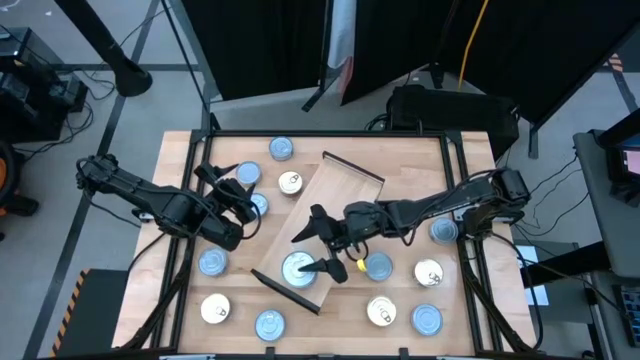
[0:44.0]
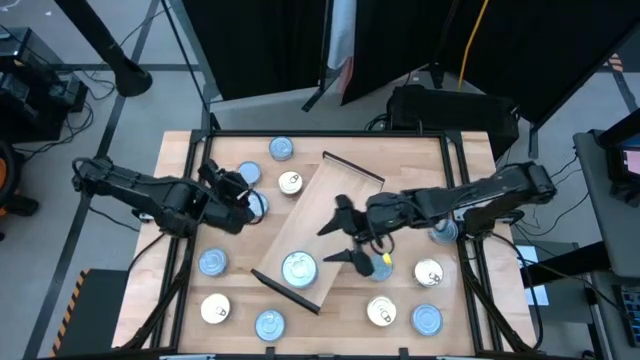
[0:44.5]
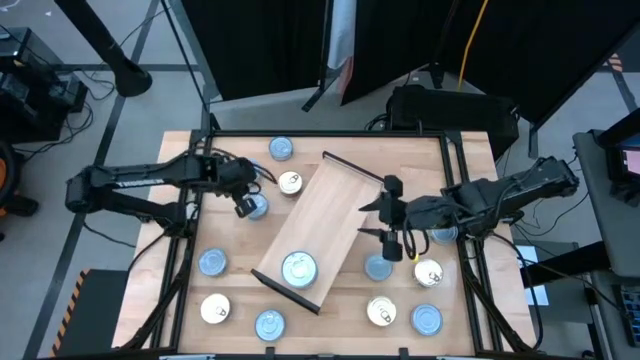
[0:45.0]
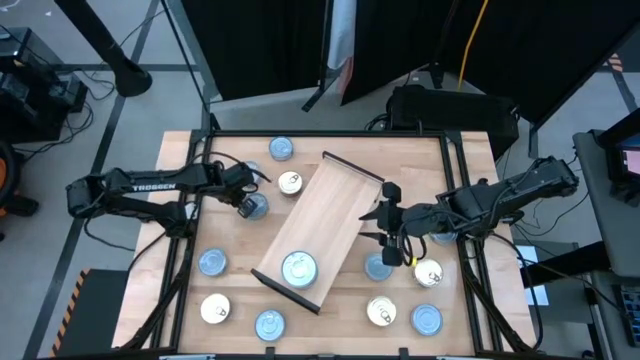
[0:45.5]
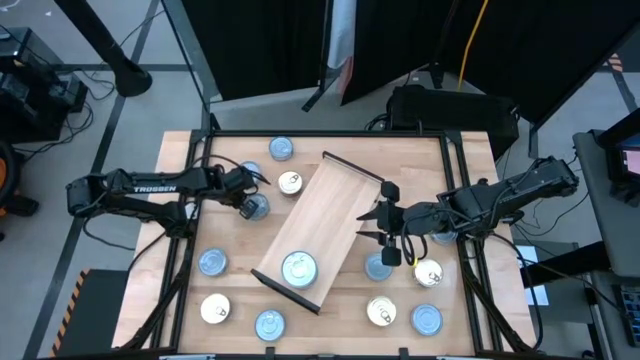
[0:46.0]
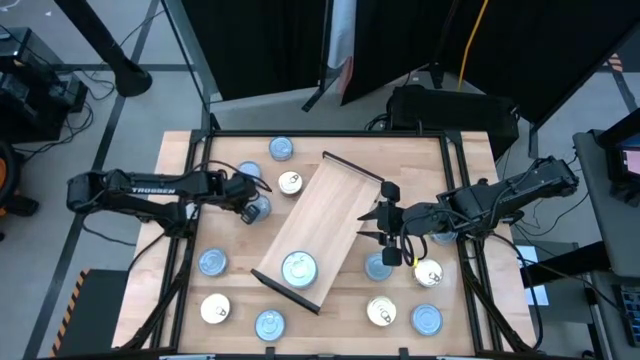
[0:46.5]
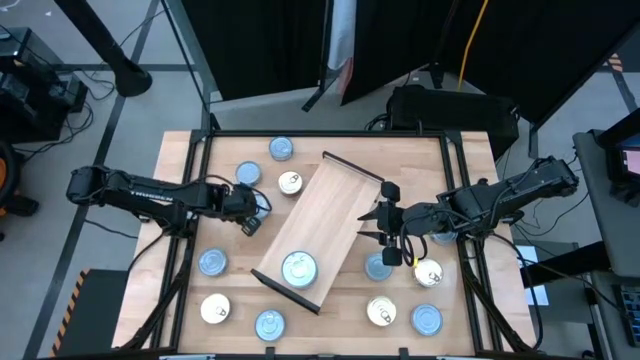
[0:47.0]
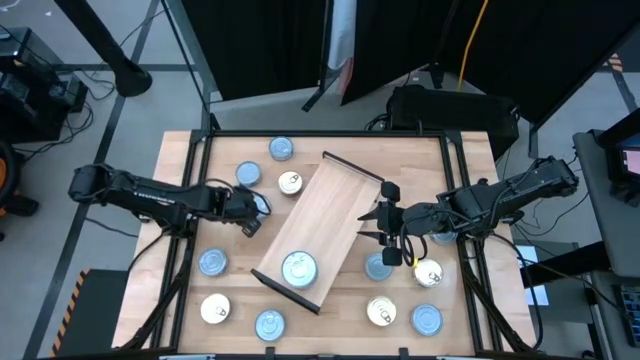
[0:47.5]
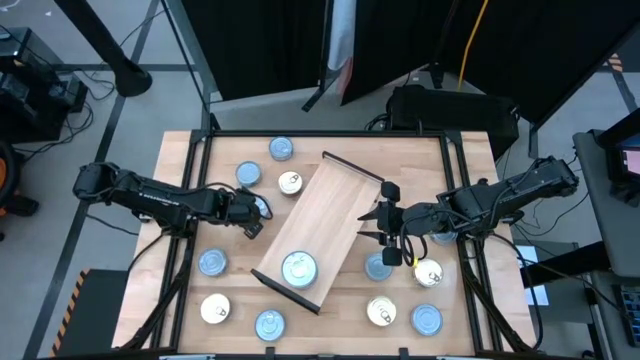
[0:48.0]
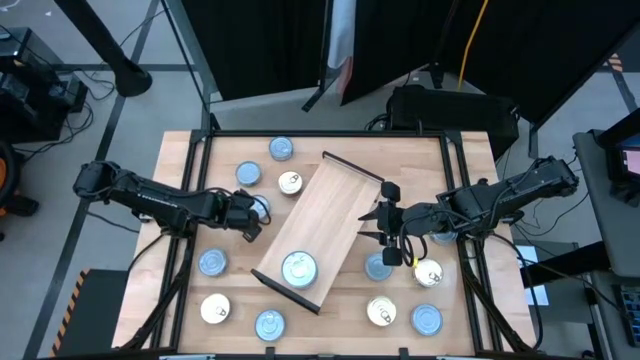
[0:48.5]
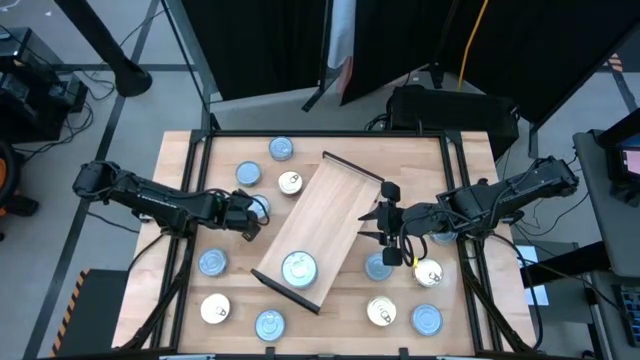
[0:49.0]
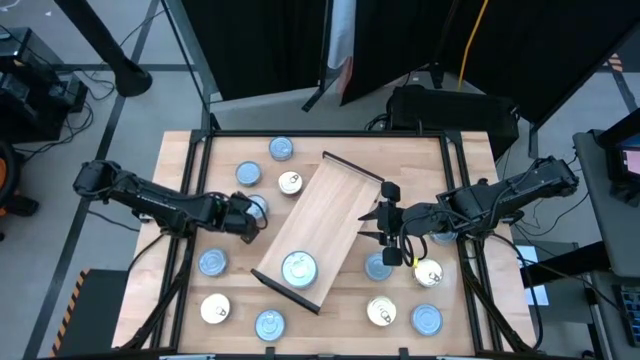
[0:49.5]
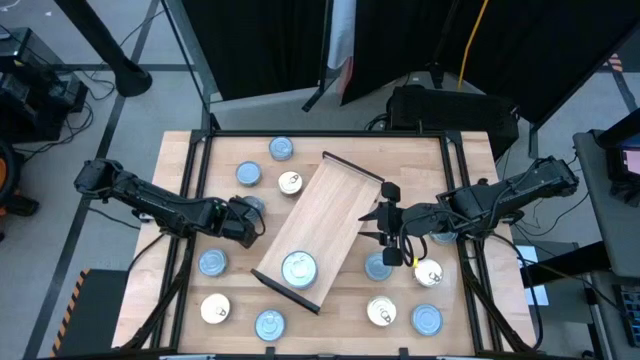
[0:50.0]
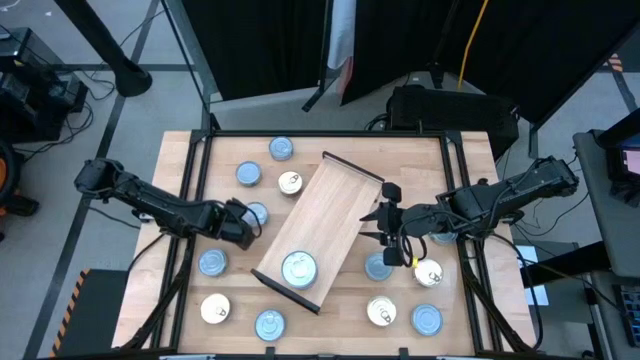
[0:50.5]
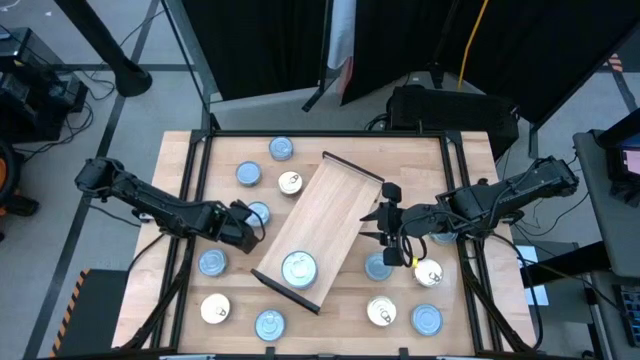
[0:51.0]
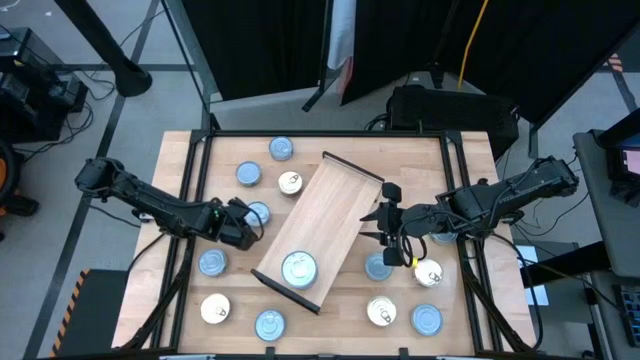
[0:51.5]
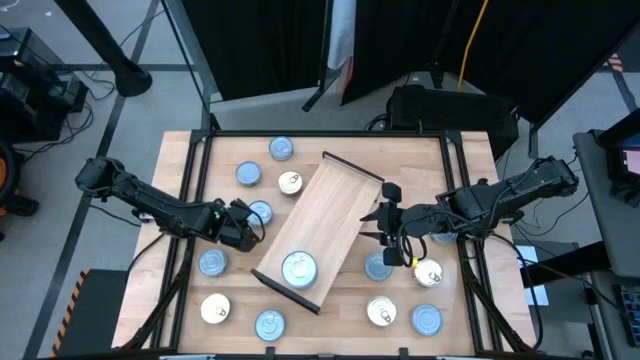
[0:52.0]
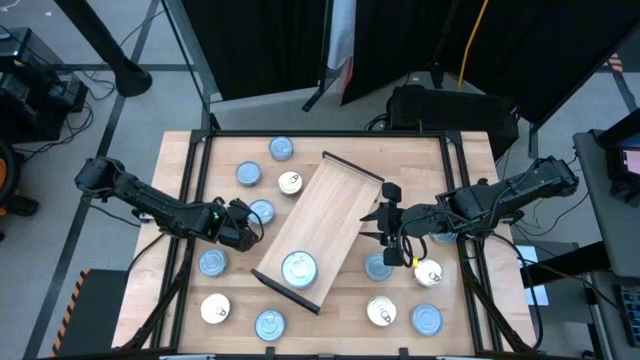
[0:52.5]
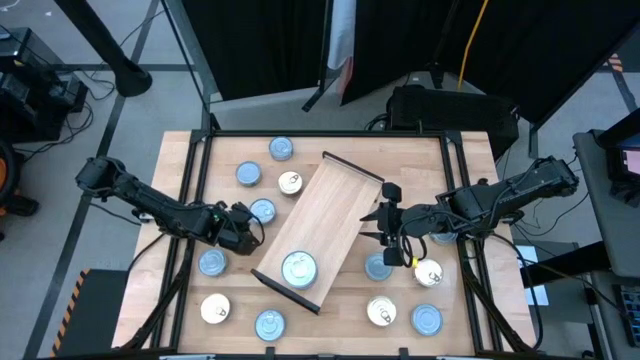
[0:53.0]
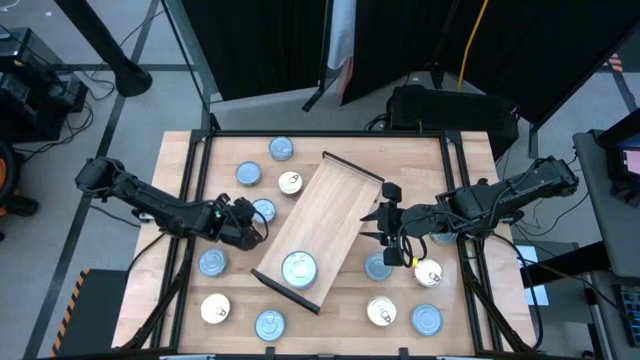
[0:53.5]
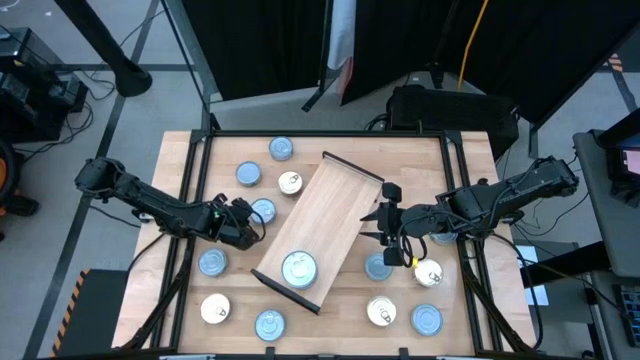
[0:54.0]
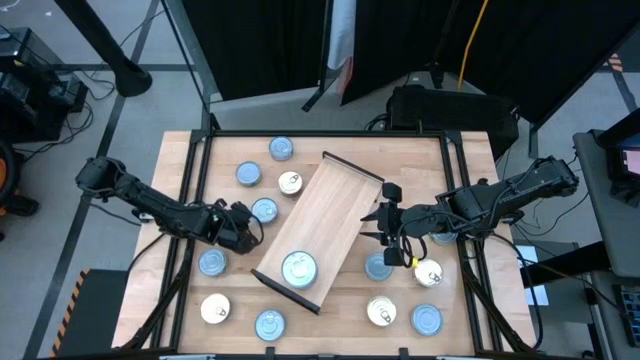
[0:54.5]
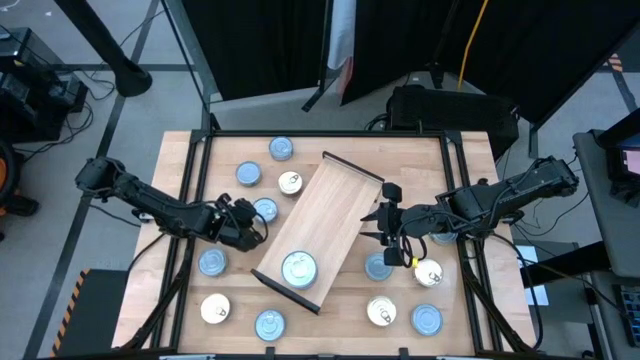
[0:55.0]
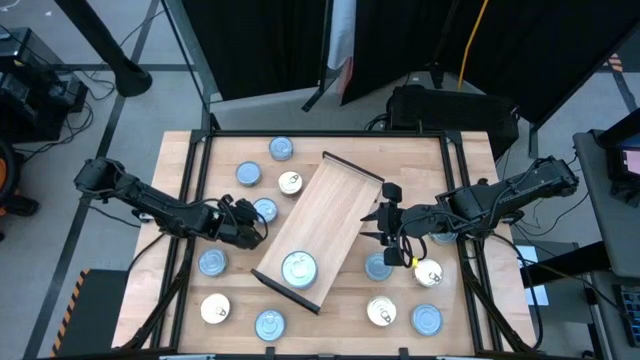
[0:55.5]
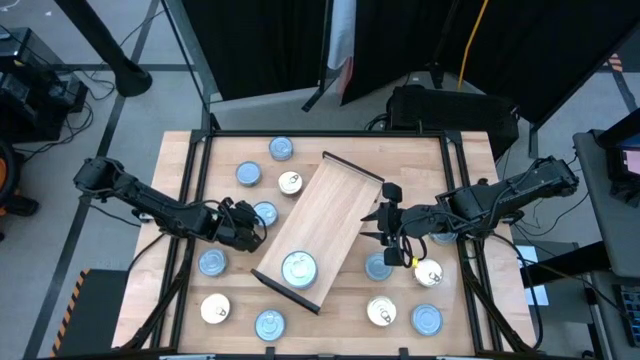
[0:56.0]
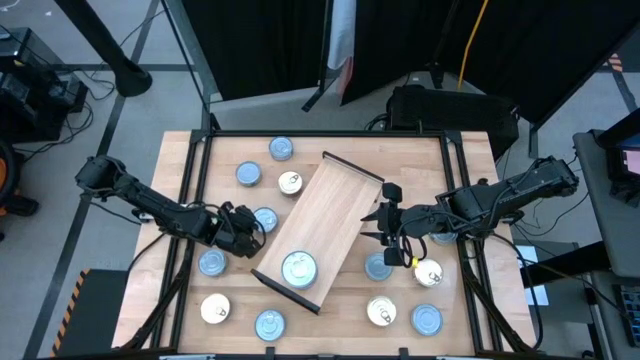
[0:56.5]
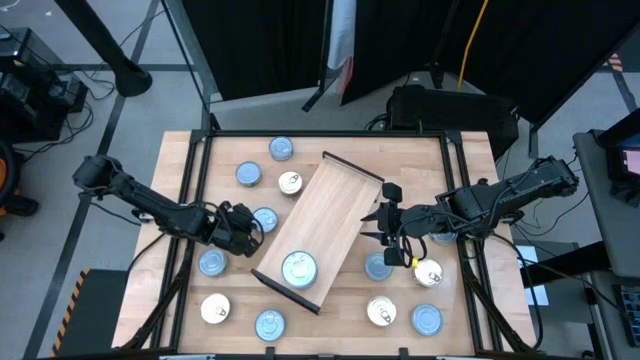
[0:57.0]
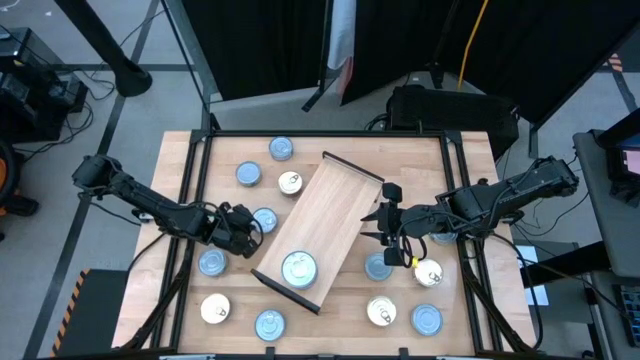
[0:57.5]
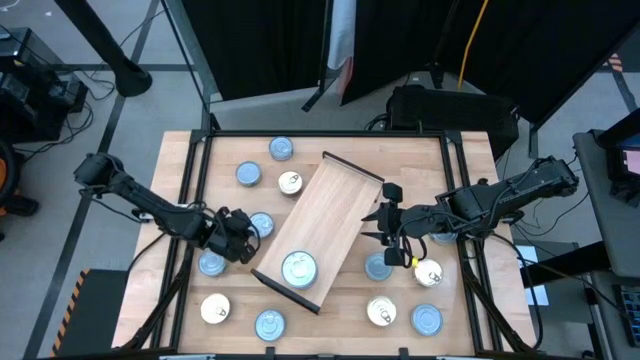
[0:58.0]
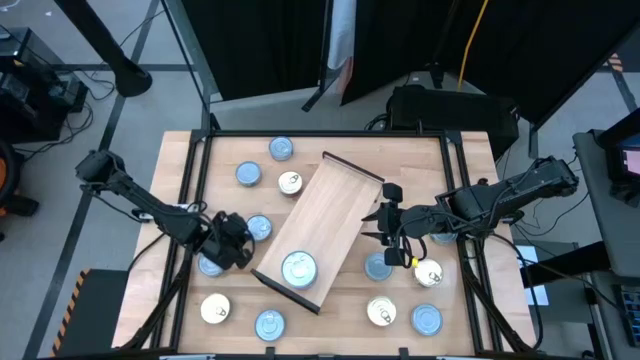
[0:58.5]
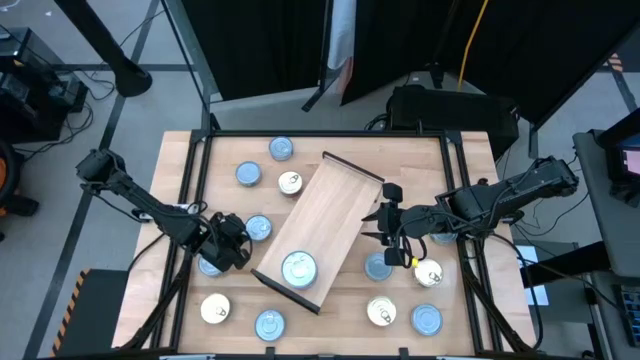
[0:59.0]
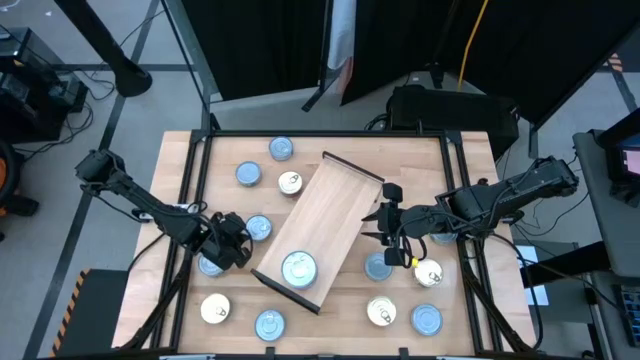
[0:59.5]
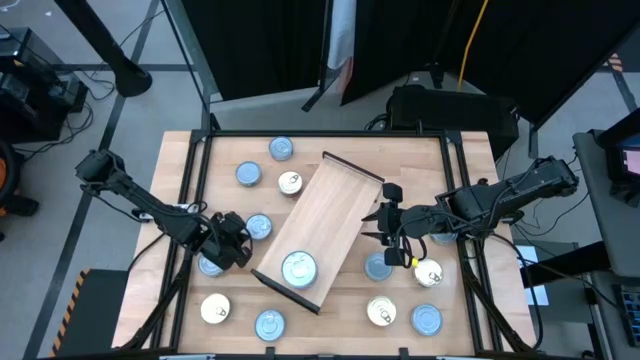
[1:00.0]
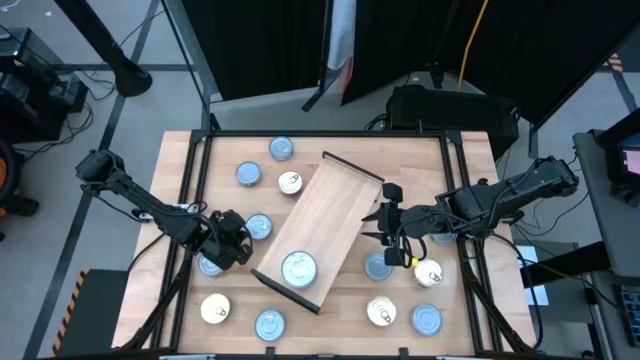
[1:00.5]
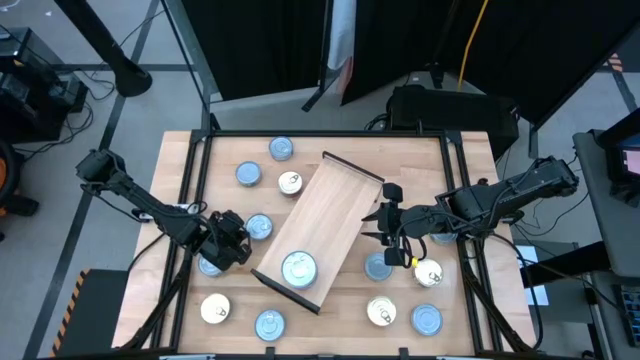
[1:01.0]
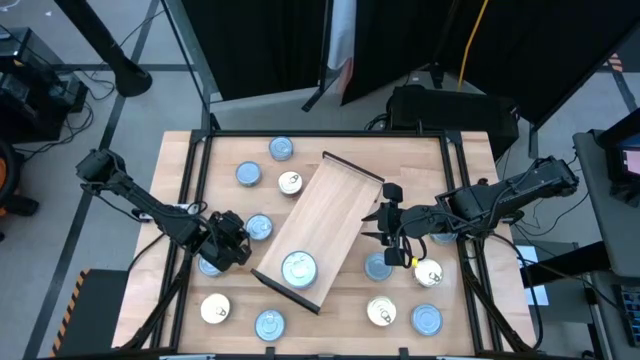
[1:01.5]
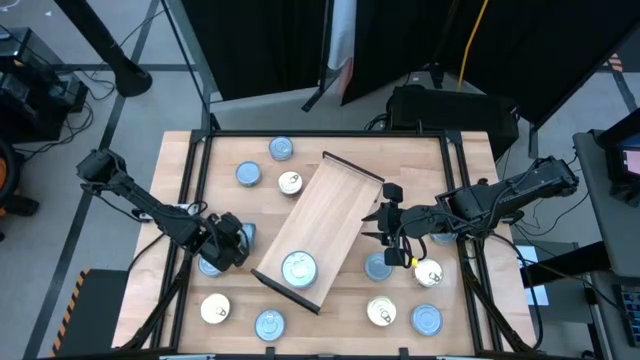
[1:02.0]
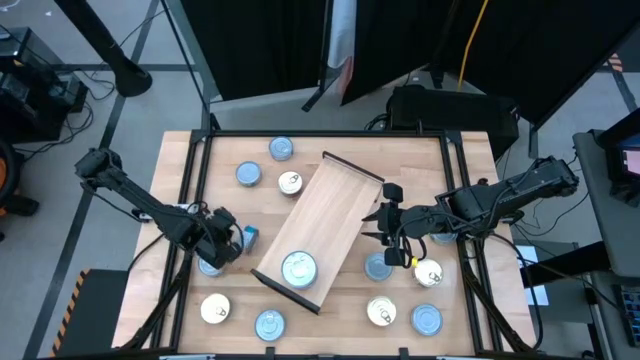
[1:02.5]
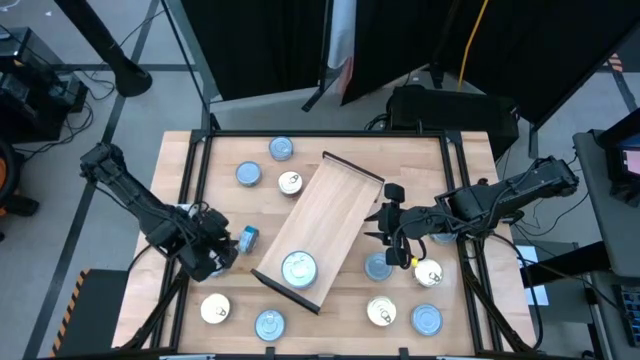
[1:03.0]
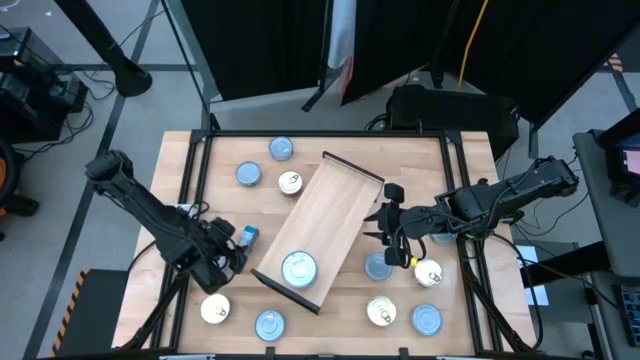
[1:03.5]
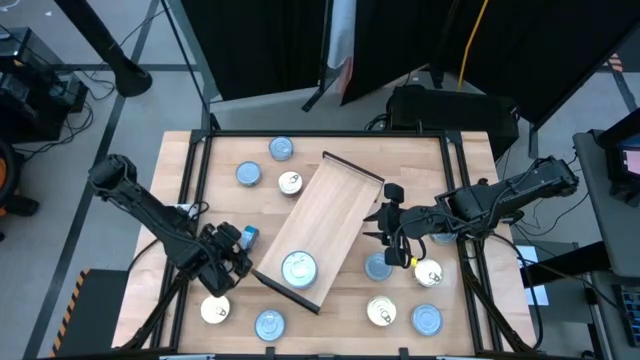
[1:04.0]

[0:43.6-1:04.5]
Task: Stack canned seafood by type on shelf
Put the light blue tuna can on the shelf
